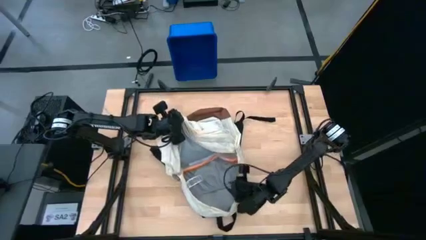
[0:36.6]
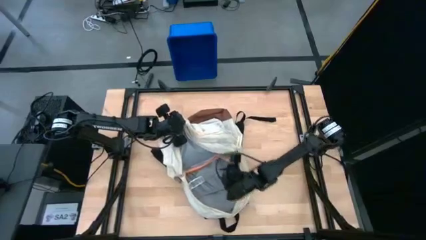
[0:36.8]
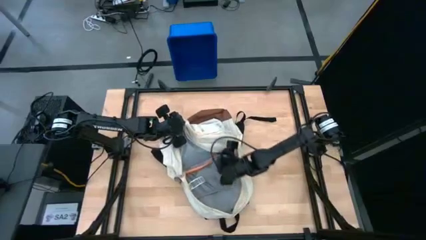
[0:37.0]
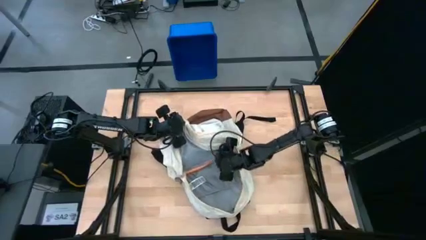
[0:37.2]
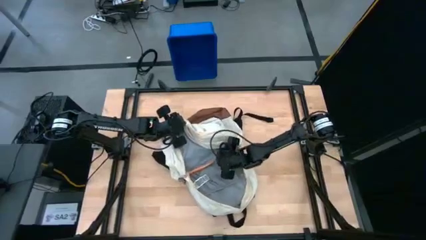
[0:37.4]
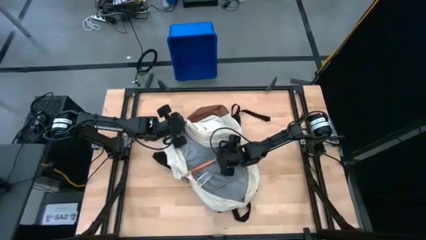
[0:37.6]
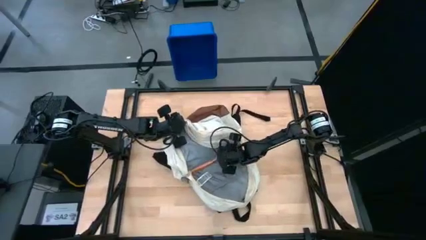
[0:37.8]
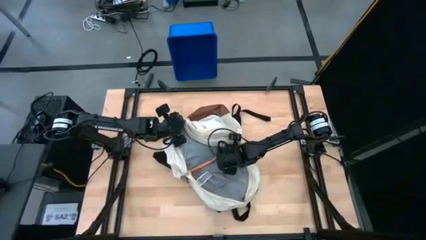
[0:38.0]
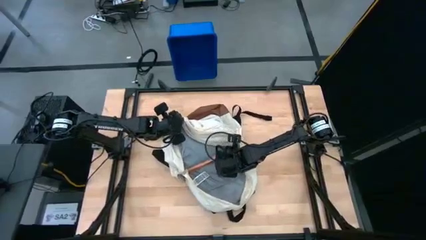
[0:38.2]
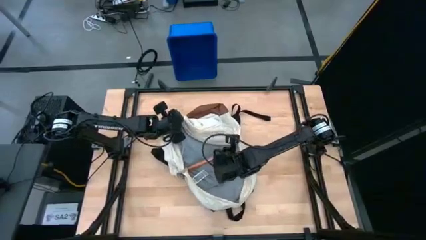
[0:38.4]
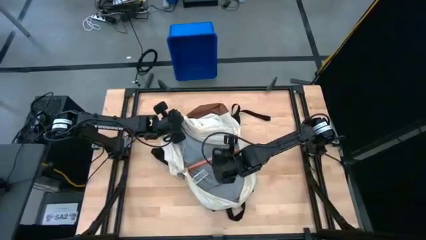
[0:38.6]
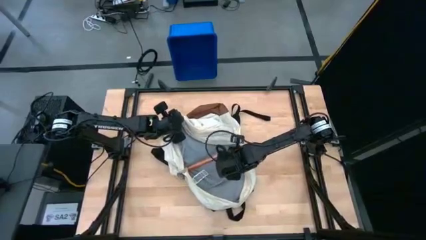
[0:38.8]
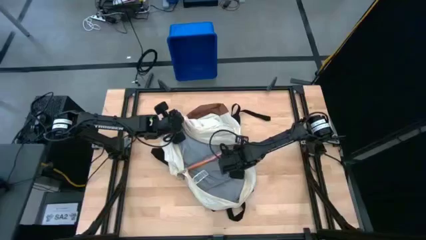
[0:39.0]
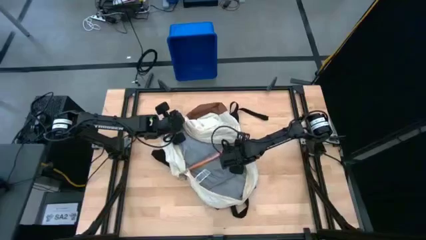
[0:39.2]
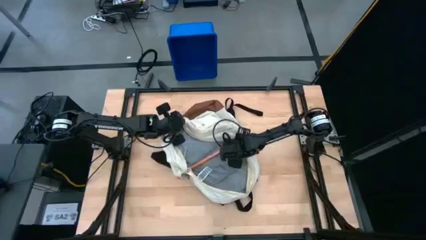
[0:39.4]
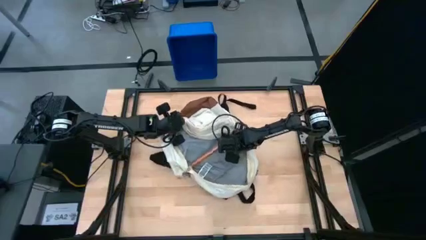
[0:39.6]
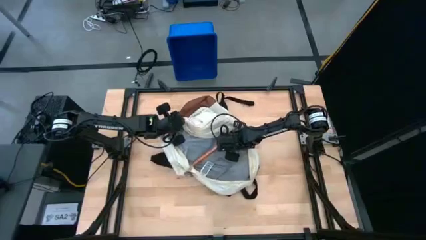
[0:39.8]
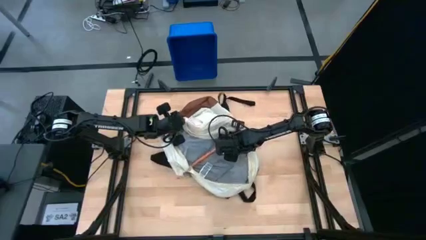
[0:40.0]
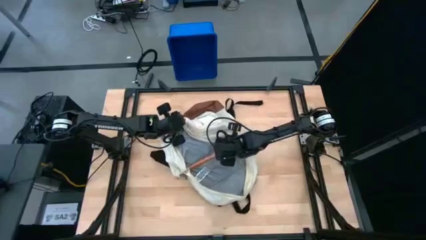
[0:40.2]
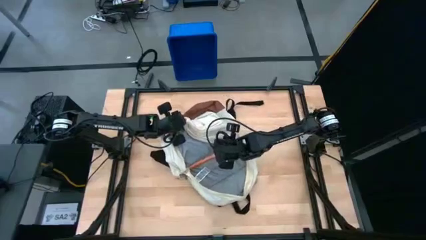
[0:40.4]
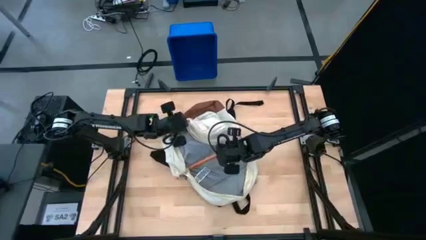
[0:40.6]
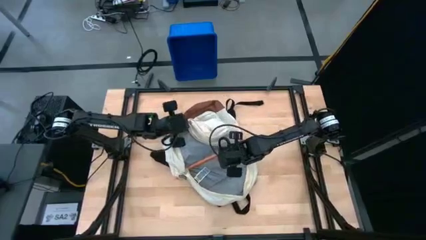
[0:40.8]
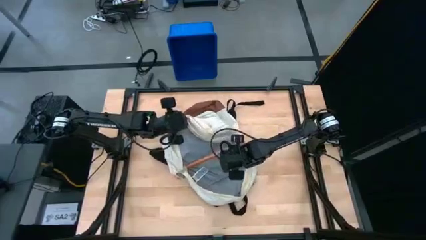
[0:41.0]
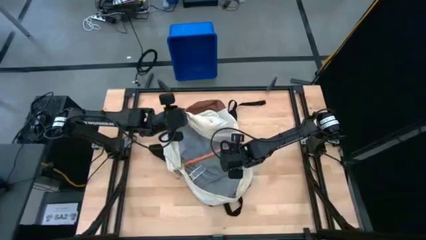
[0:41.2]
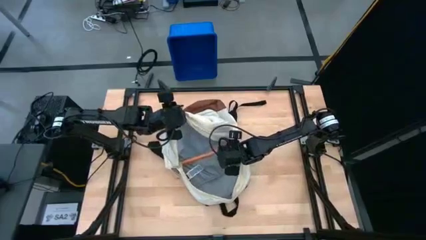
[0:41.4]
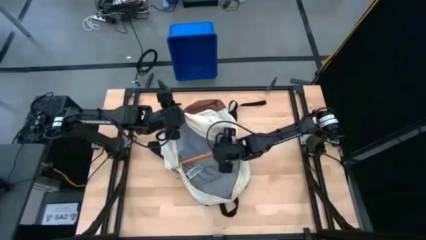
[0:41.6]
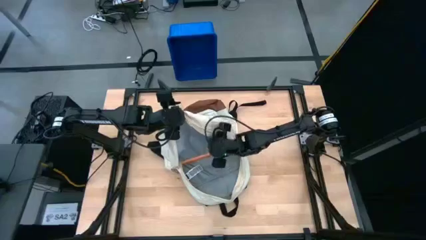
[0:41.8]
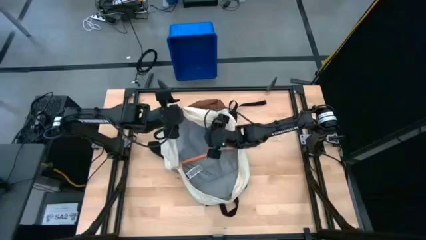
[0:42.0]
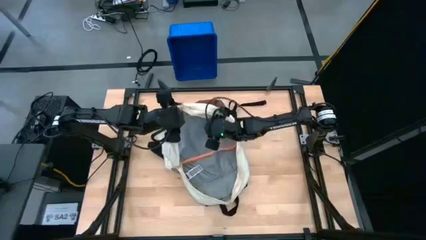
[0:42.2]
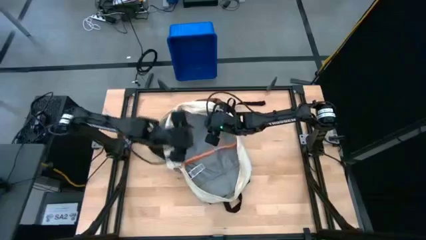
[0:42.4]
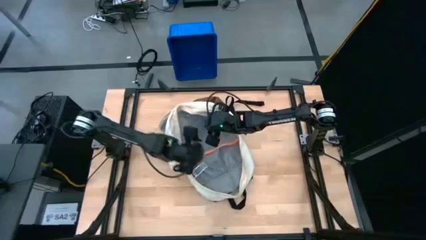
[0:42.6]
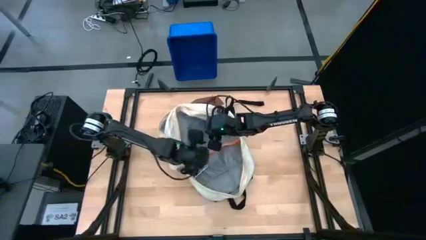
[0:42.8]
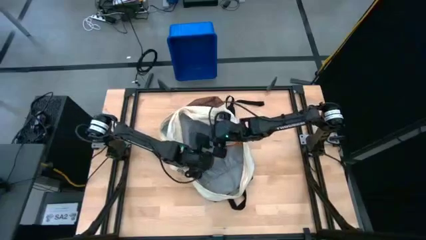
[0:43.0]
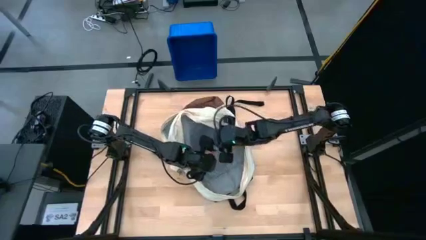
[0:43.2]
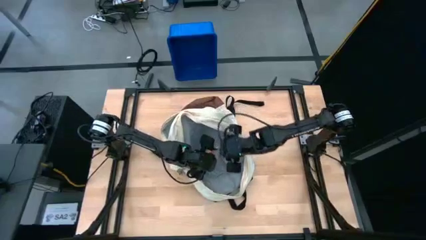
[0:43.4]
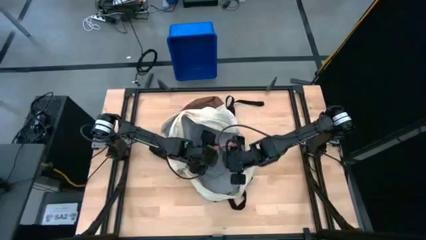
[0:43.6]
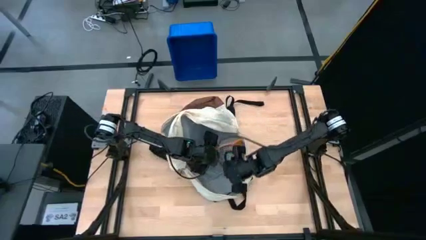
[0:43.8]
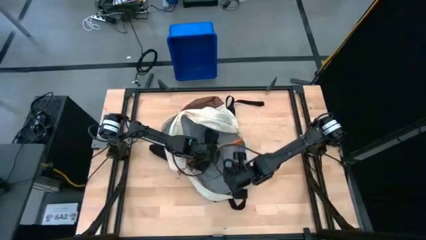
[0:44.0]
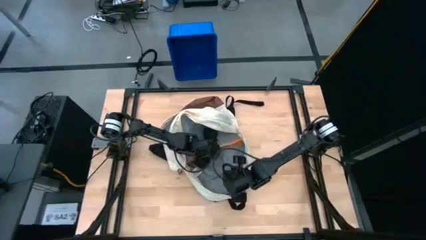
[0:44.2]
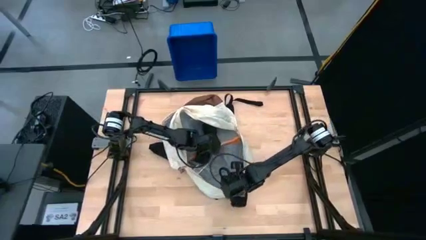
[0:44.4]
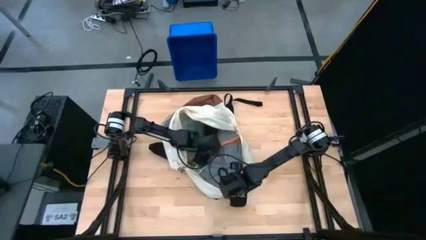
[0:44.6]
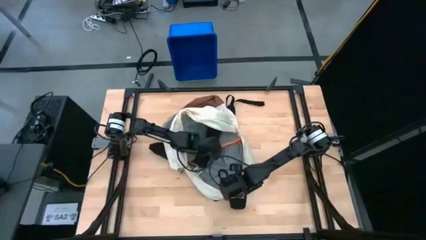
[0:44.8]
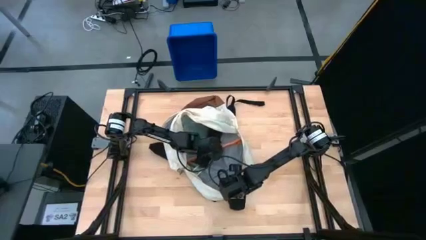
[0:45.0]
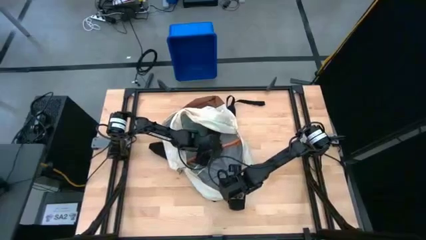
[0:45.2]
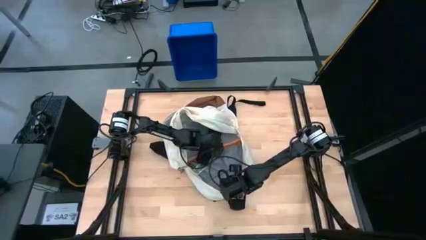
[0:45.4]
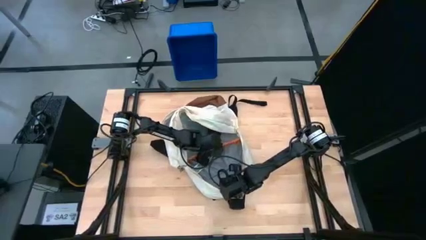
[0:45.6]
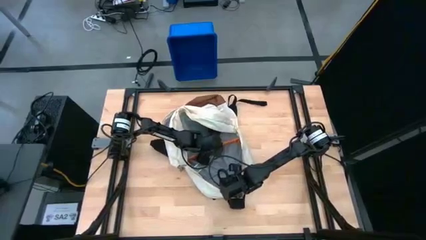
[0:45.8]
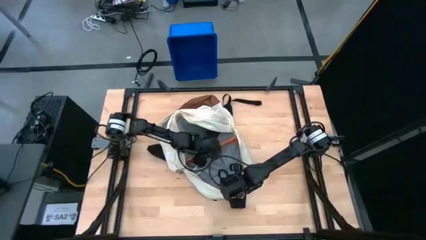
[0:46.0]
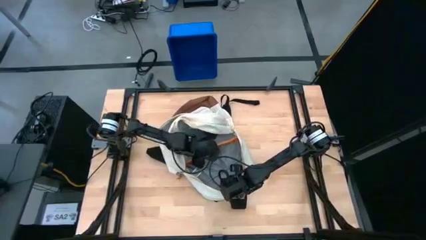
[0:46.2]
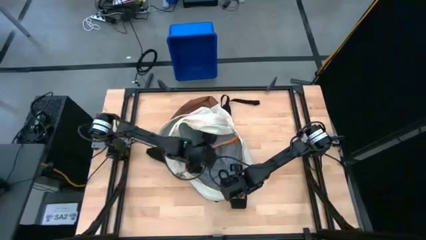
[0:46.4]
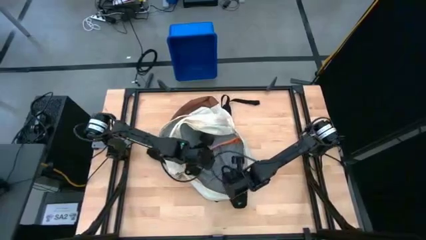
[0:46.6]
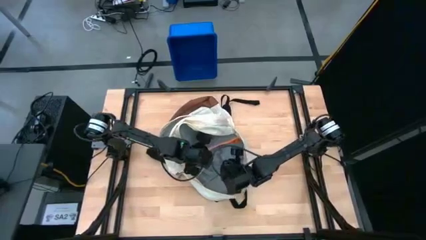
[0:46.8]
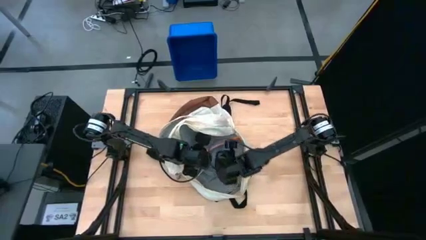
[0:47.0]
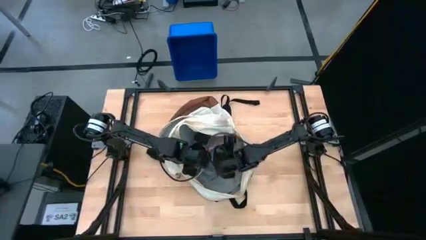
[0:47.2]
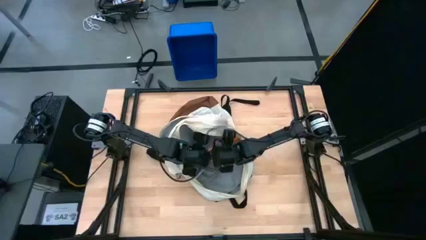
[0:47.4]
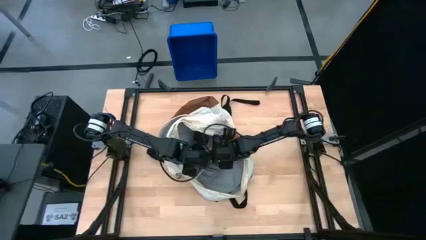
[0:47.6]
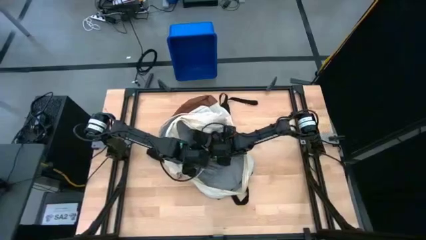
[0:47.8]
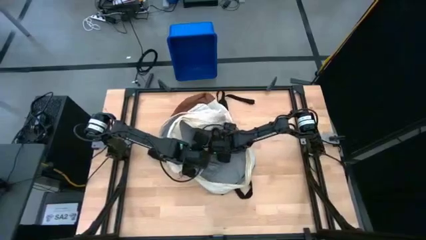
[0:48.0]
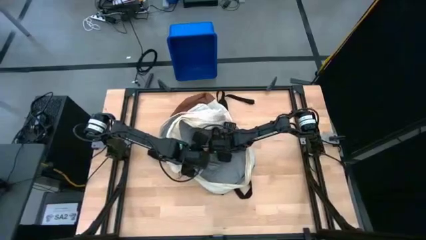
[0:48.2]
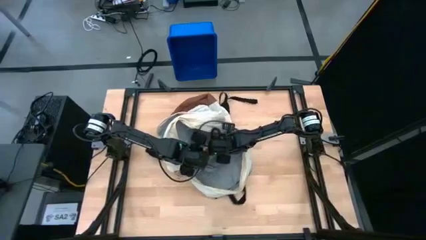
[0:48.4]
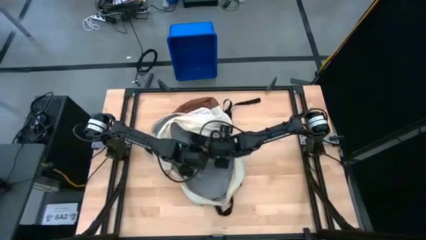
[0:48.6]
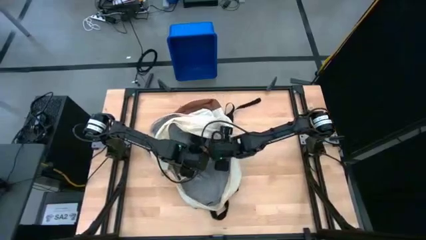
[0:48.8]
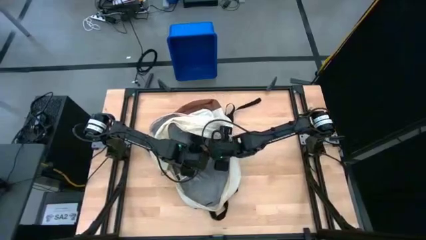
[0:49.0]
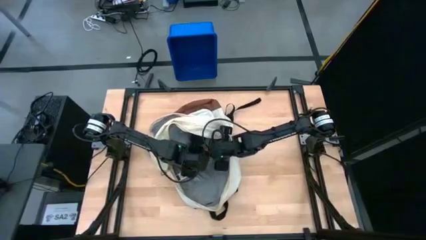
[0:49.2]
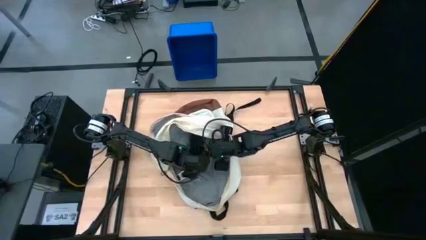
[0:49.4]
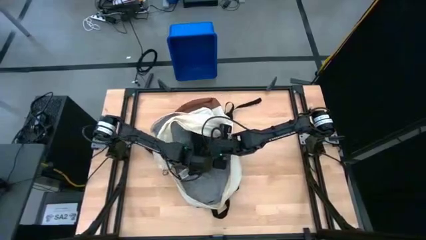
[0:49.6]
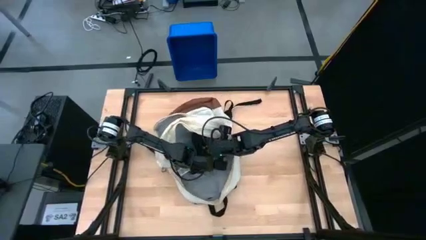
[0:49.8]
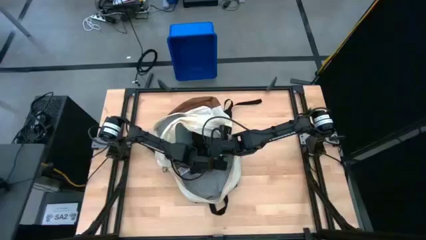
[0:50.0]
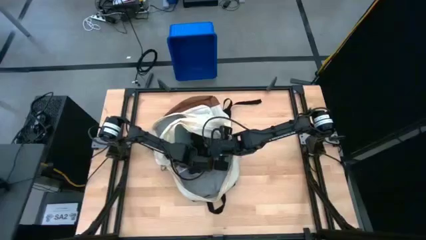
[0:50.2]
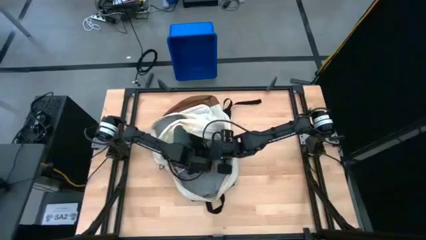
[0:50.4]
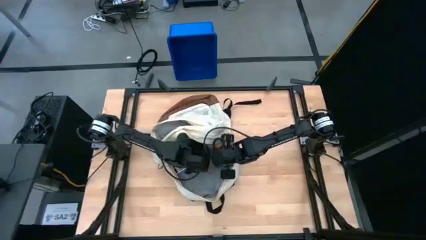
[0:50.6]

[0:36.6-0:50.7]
Task: Unpack backpack
Remove the zip bag from the white backpack
